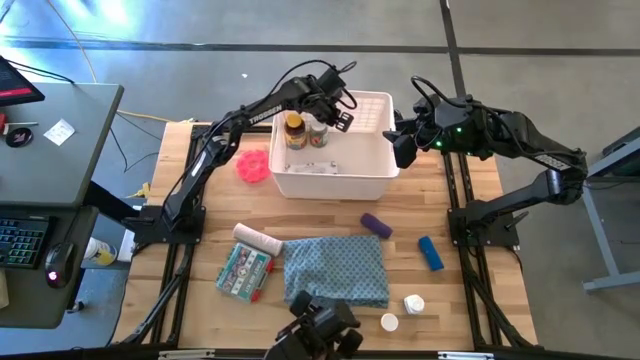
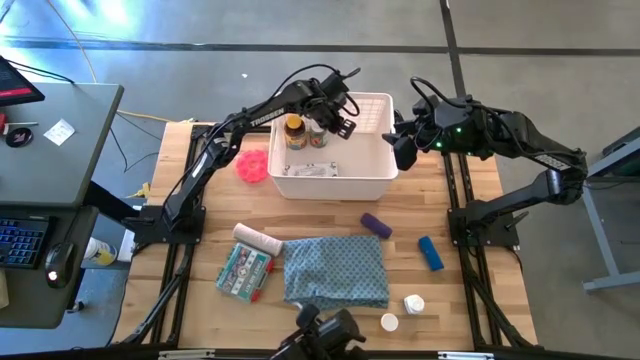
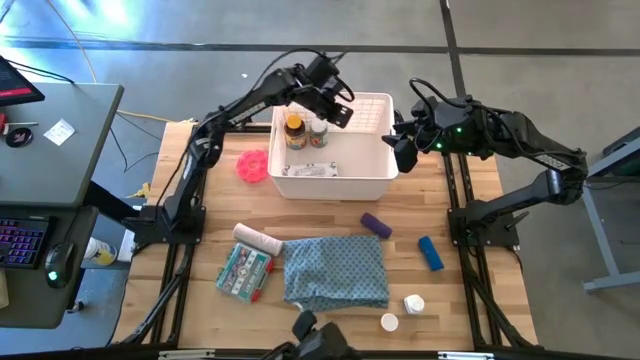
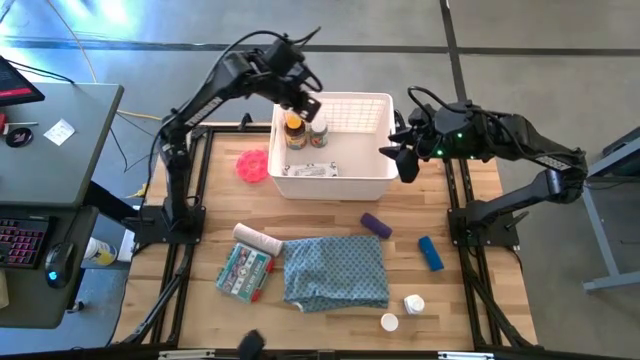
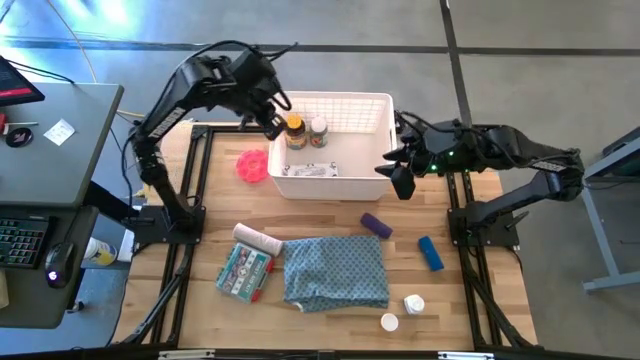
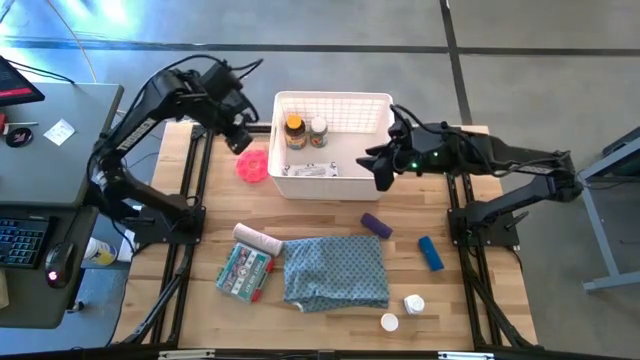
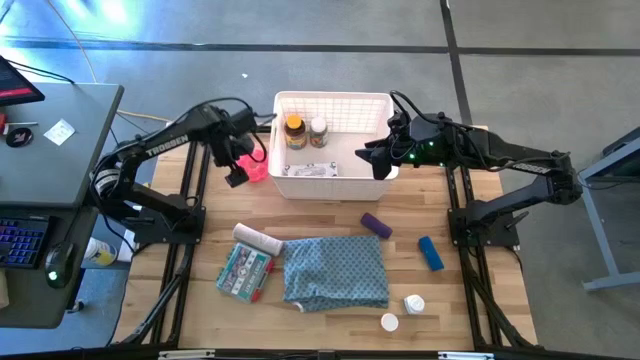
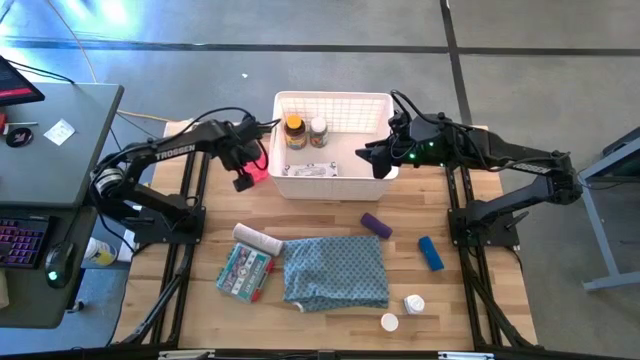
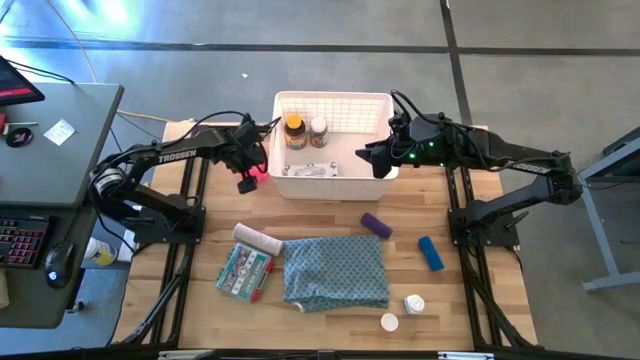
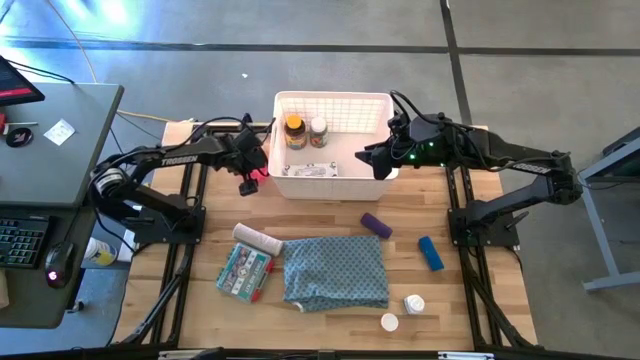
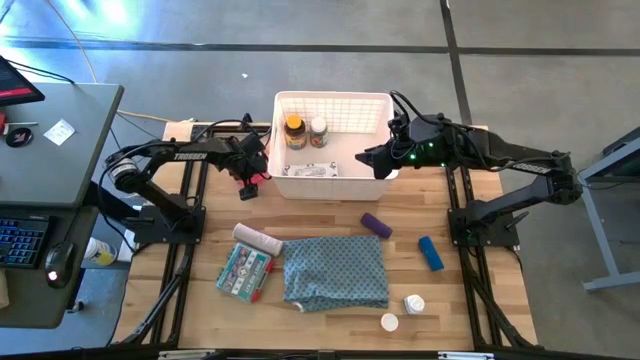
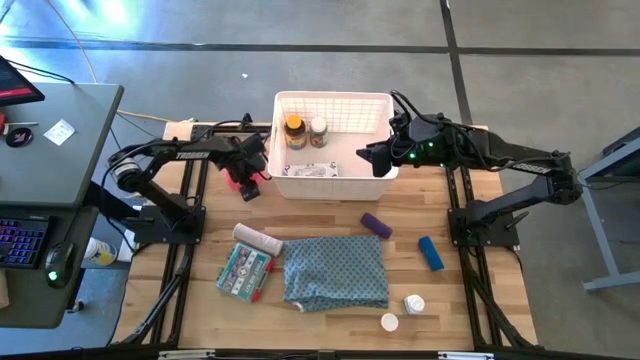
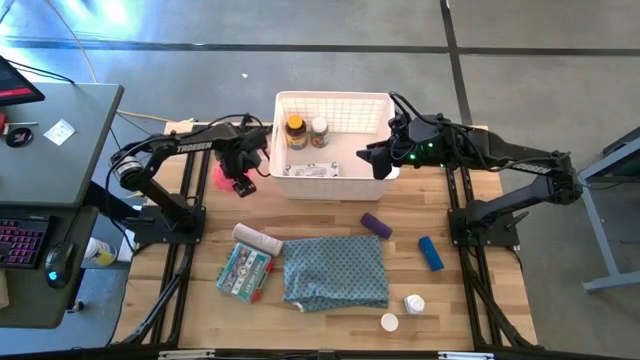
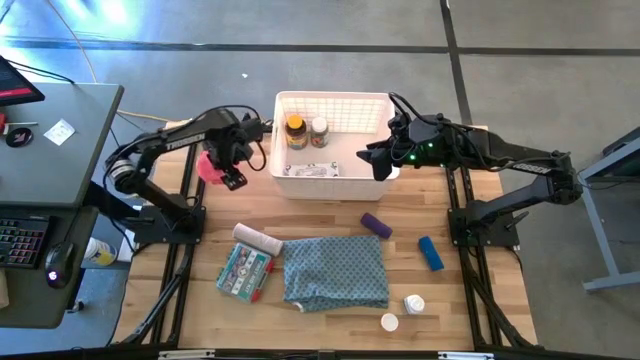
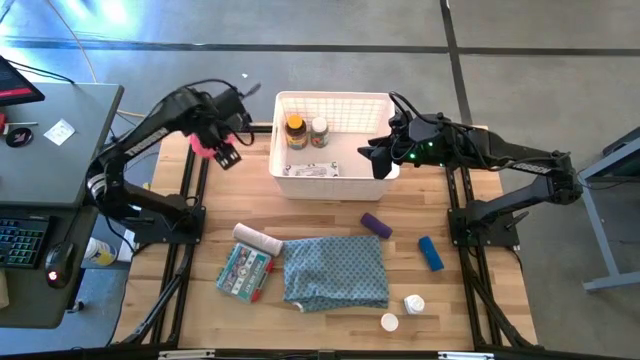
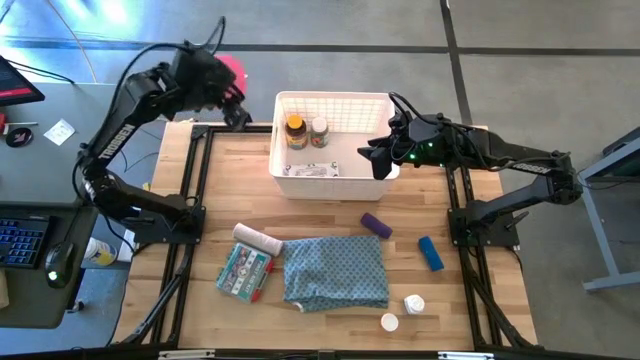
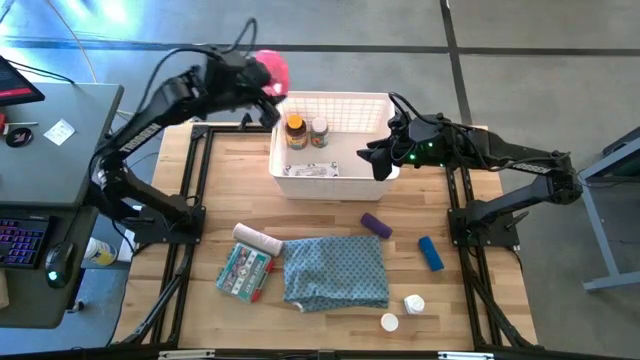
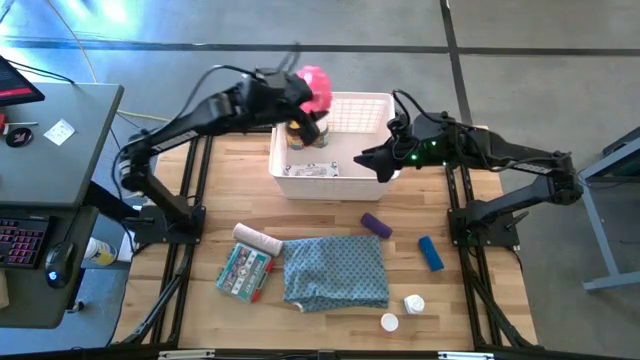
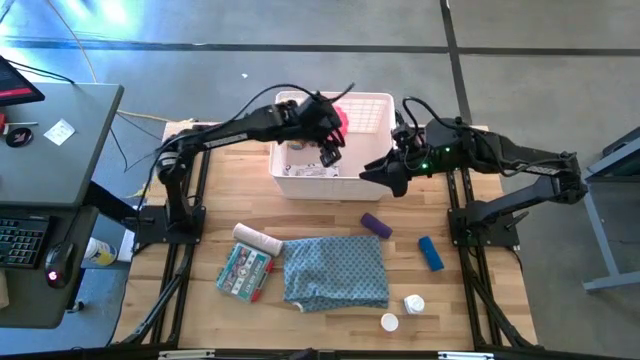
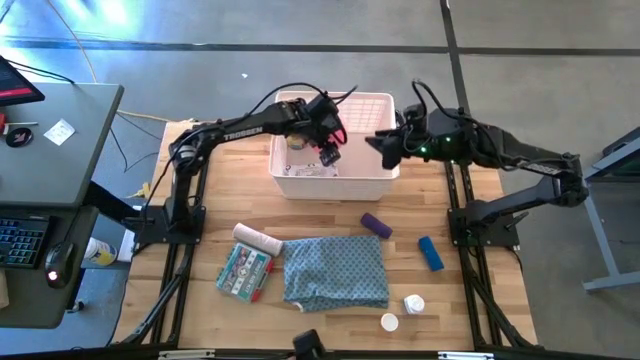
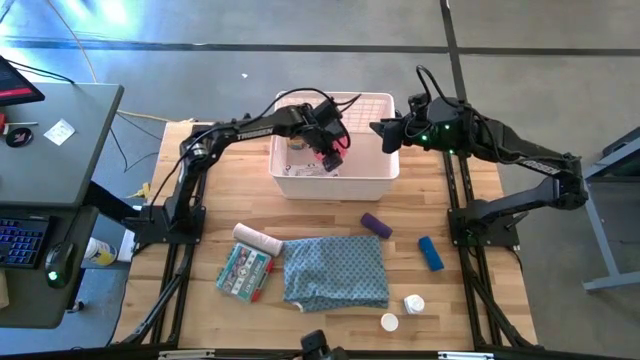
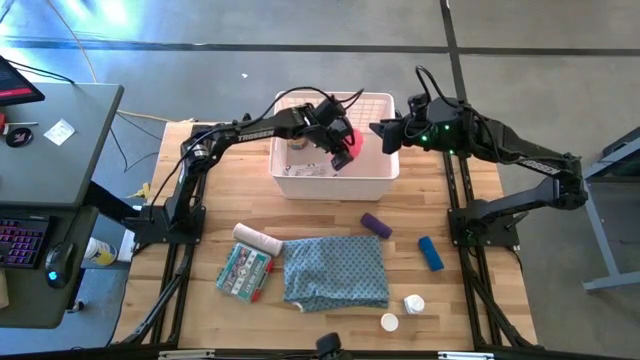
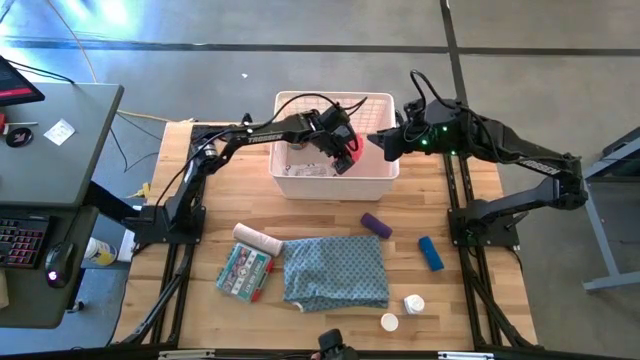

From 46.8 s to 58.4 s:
Task: Pick & place medical supplies in basket/bin
Put the pink circular pill organizer into the white bin

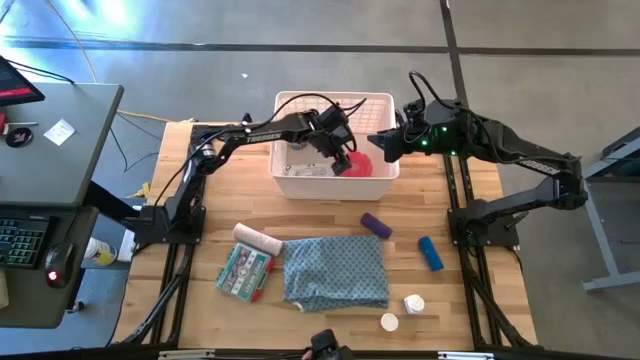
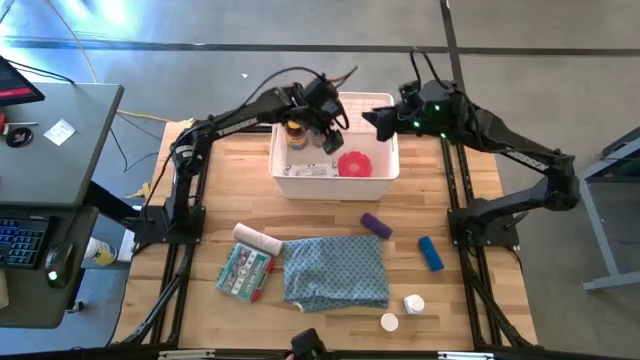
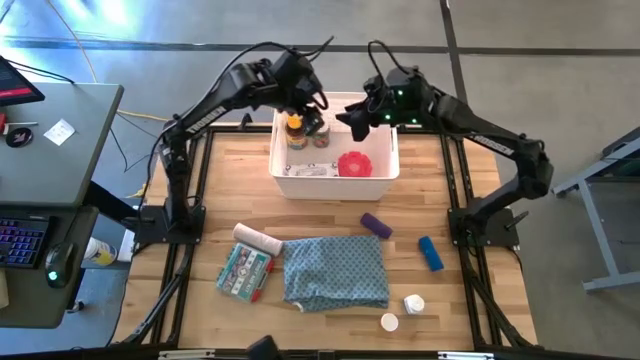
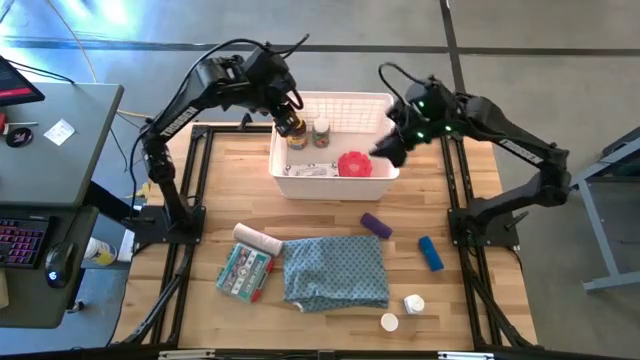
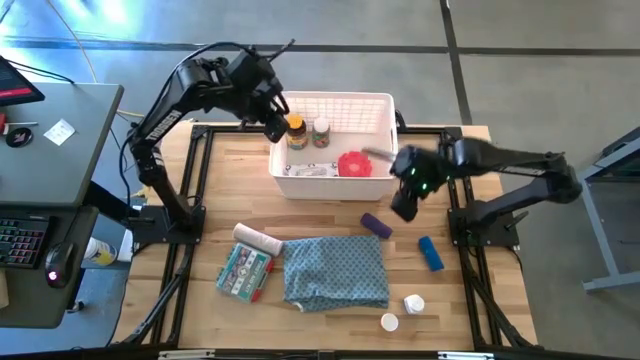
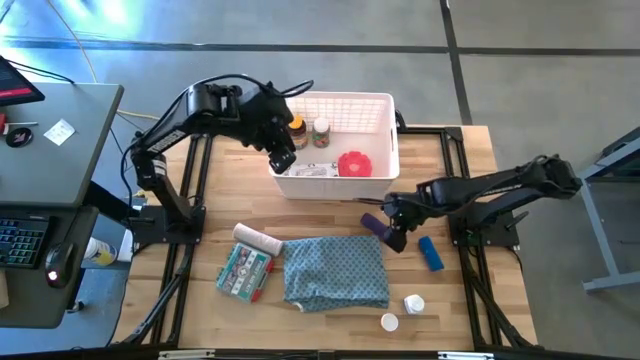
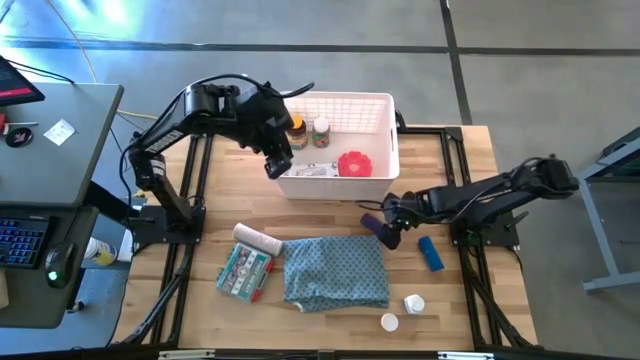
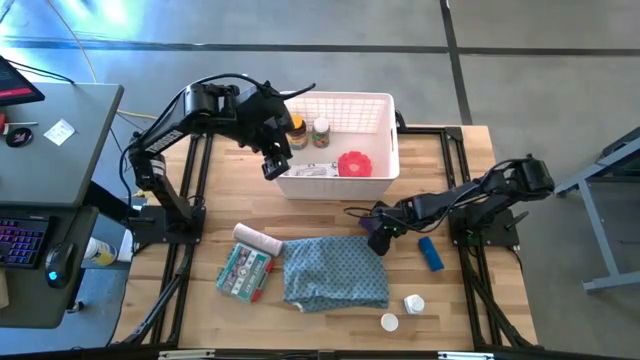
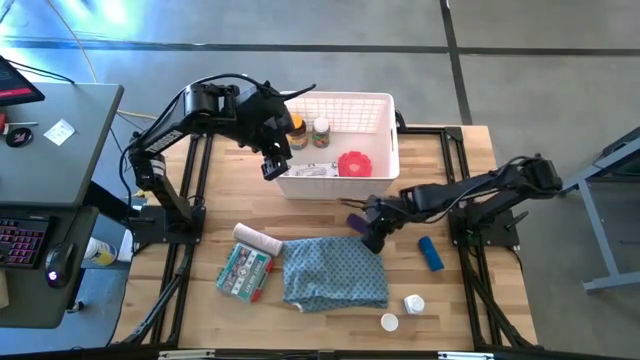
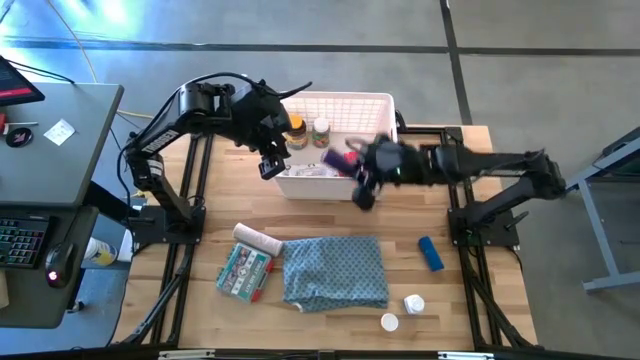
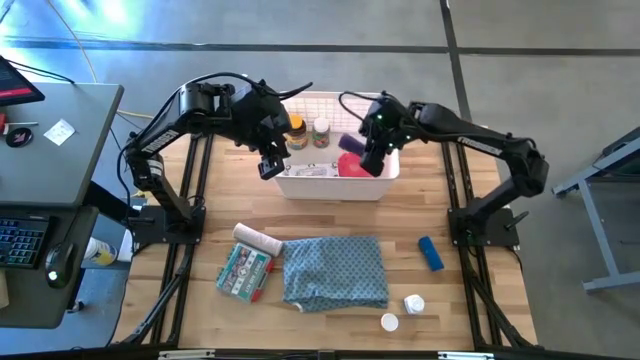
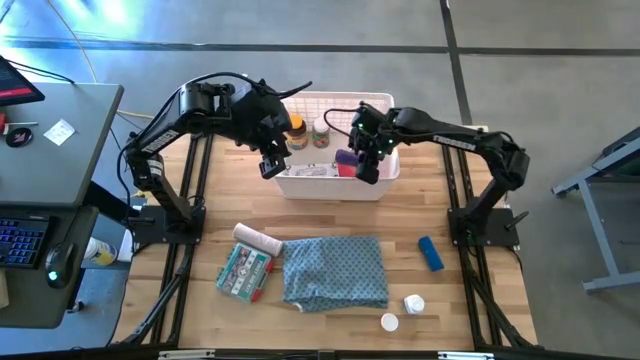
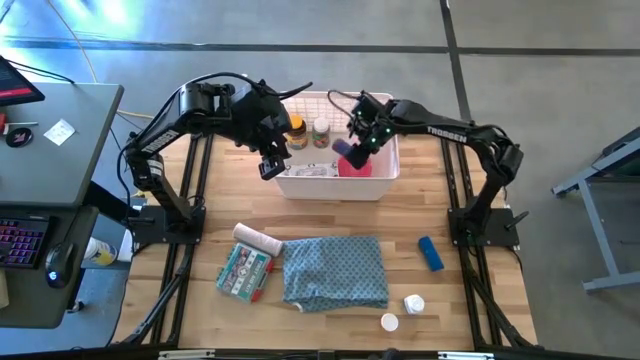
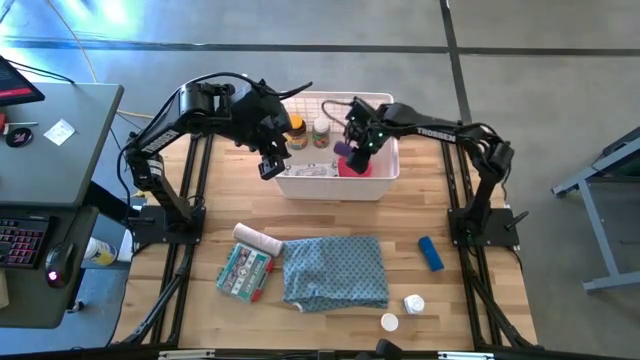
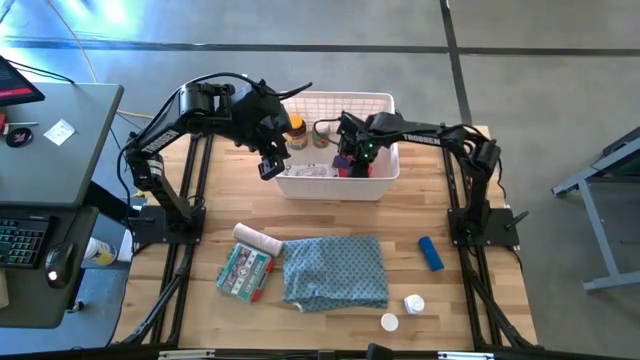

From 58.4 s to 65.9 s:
Put the purple bandage into the white bin

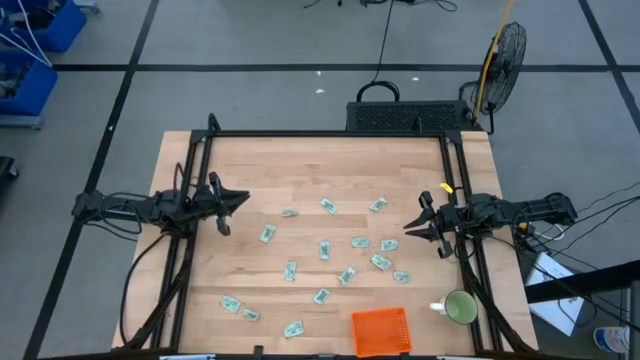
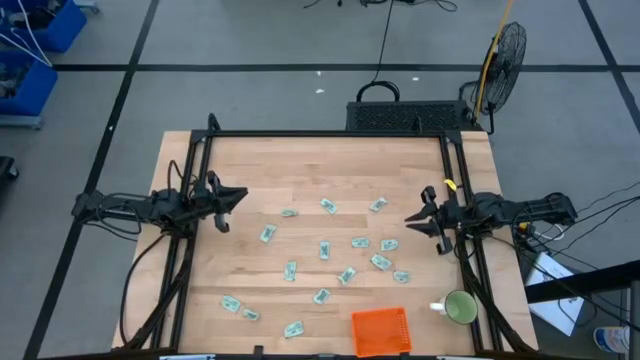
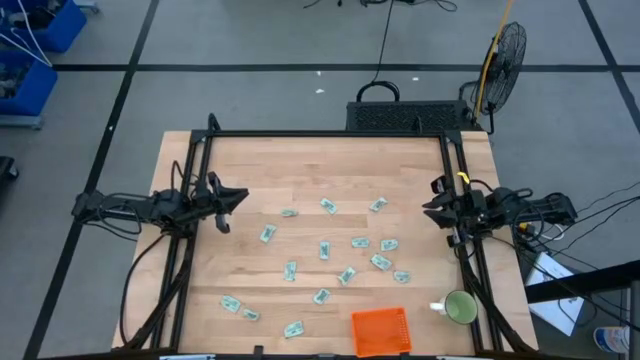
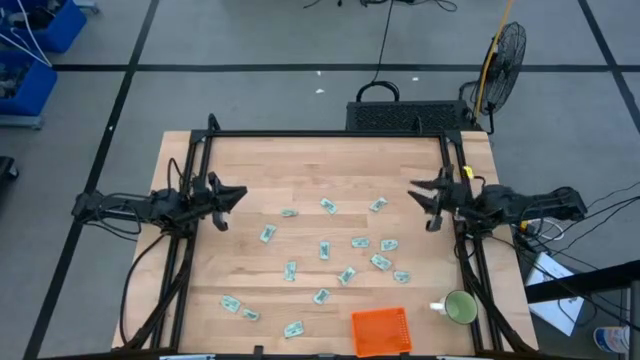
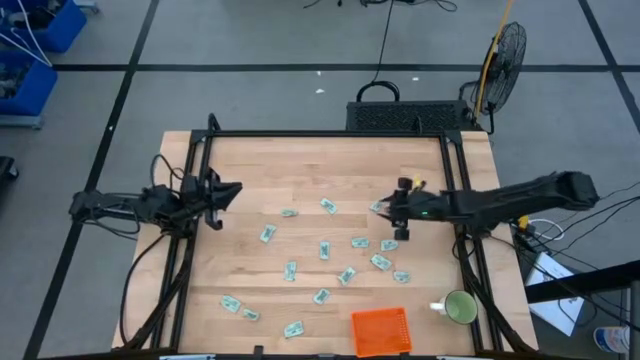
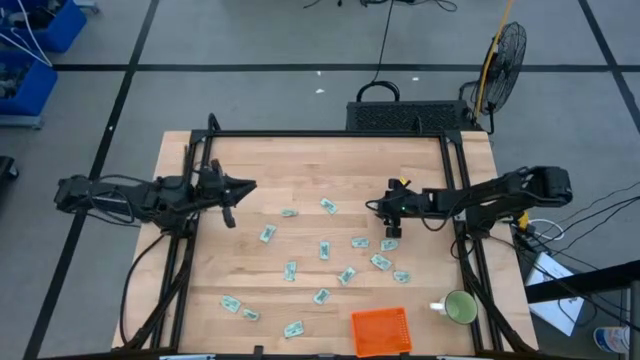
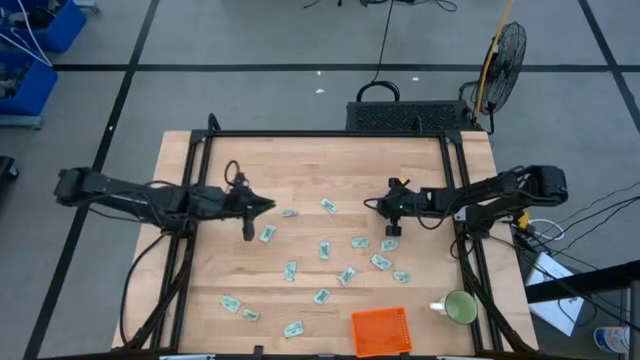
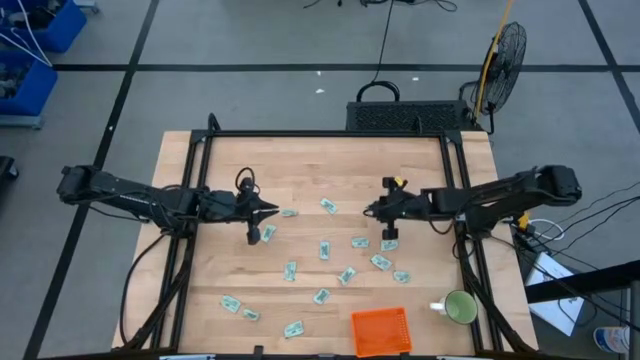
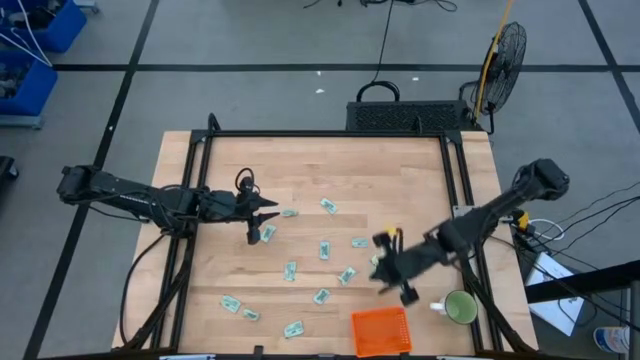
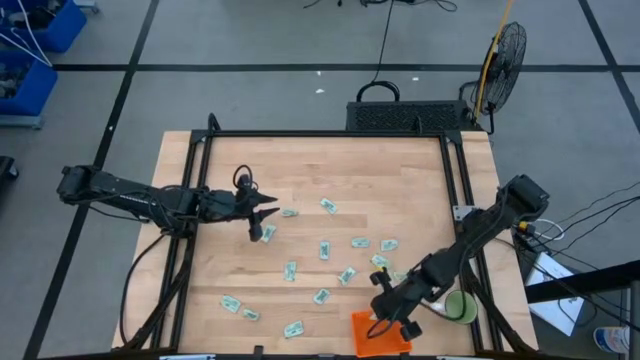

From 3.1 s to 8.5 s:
Task: Pick and place Stevia / Truvia into bins
Put the stevia packet into the orange bin
